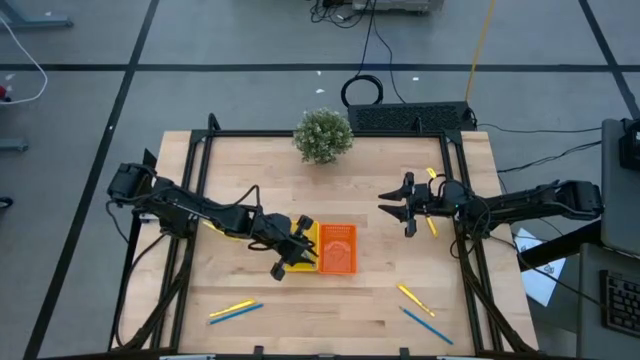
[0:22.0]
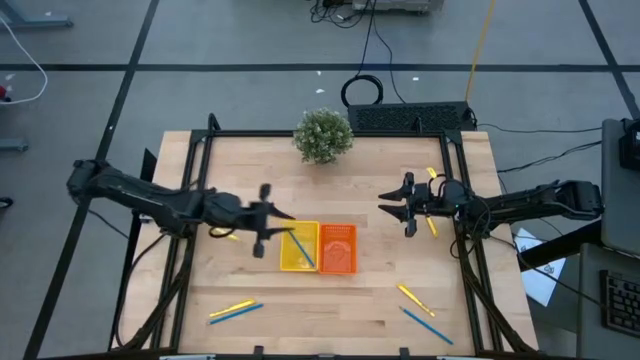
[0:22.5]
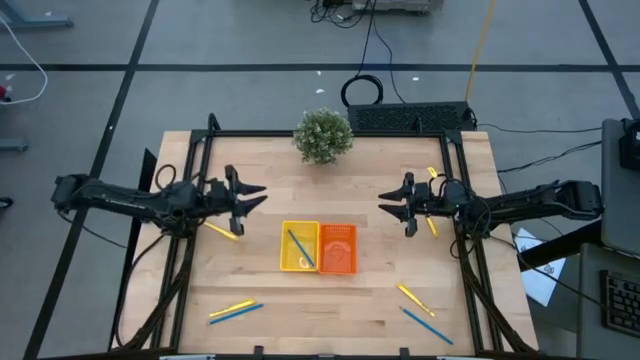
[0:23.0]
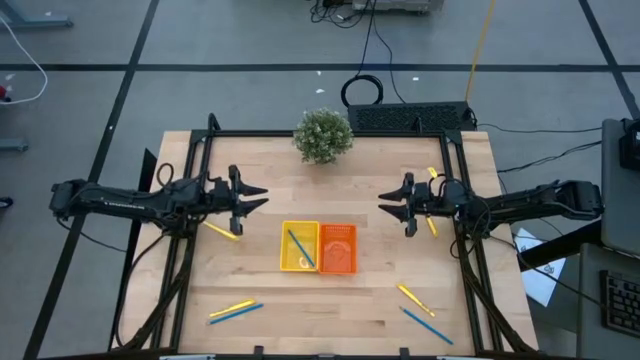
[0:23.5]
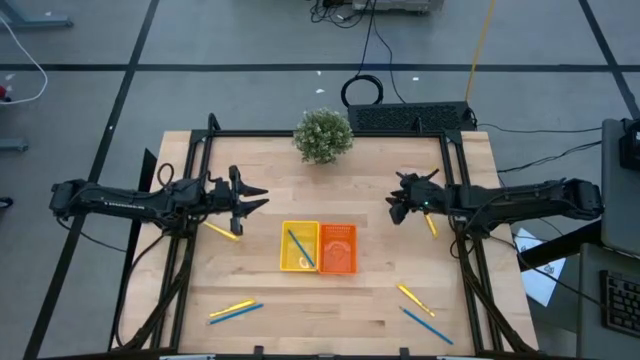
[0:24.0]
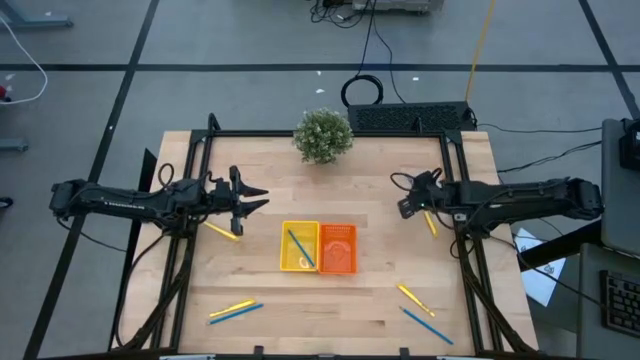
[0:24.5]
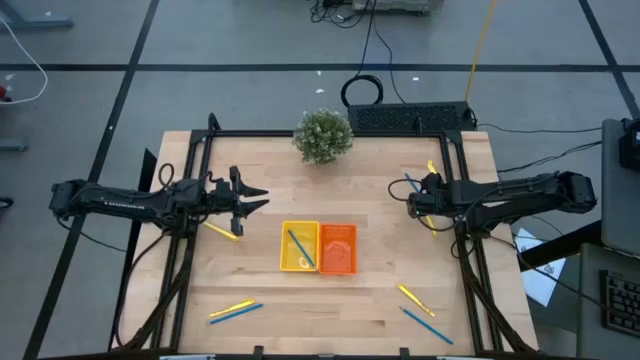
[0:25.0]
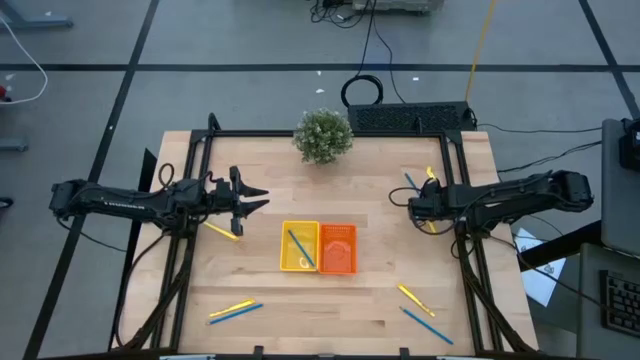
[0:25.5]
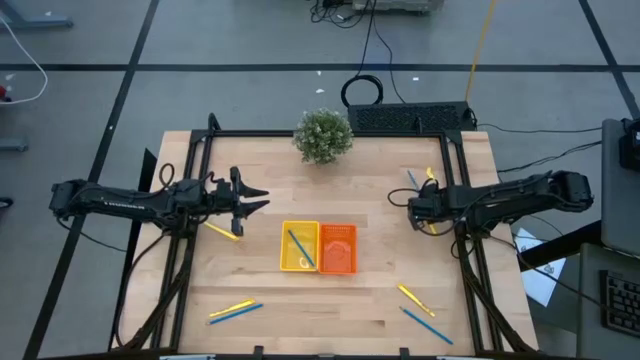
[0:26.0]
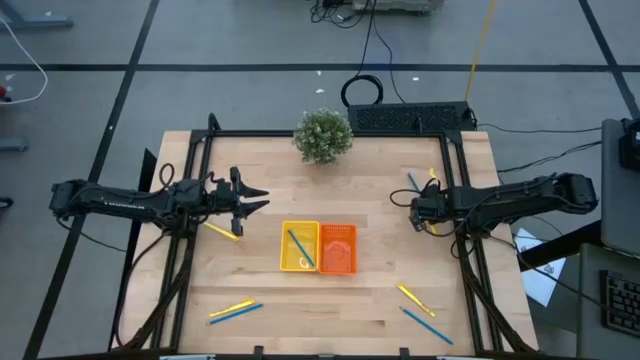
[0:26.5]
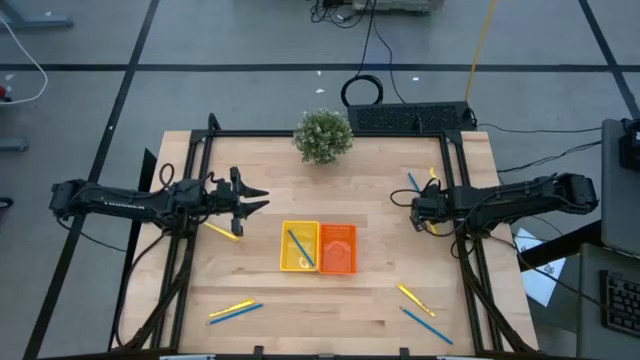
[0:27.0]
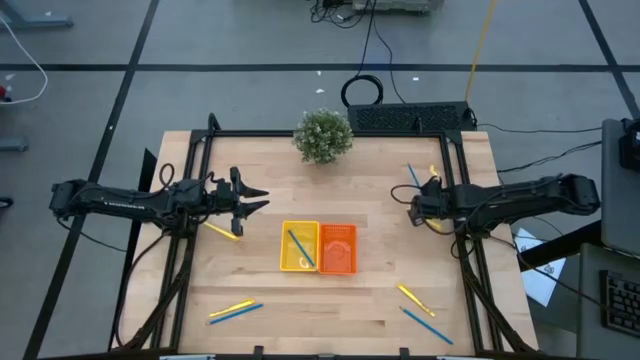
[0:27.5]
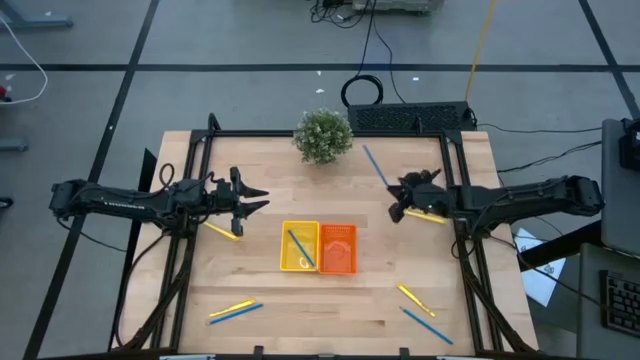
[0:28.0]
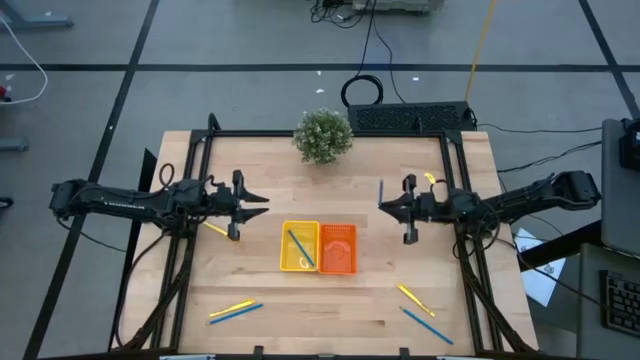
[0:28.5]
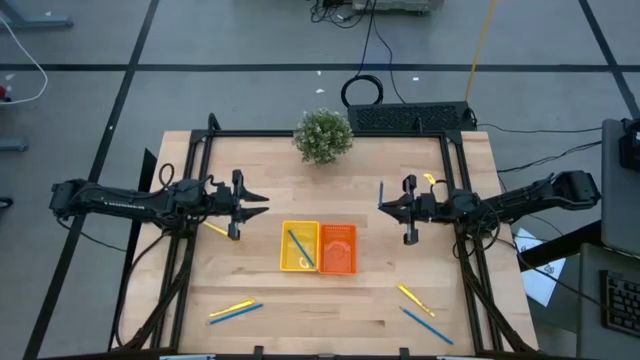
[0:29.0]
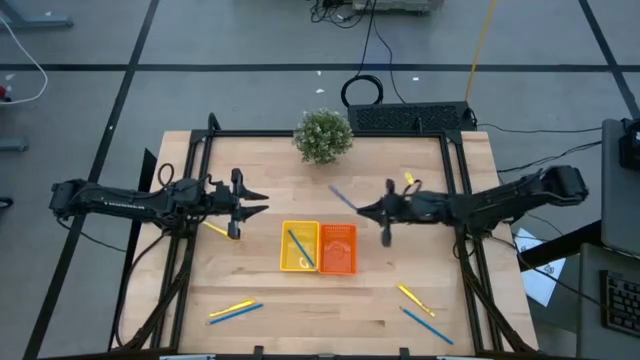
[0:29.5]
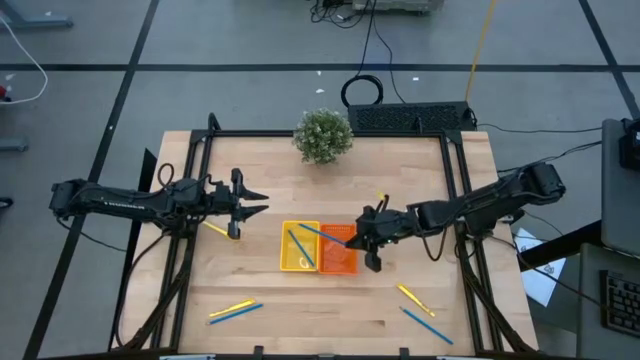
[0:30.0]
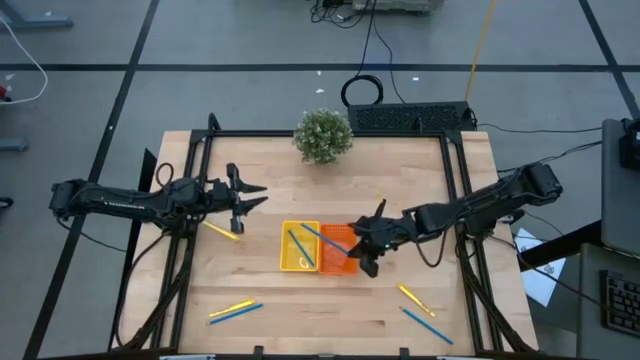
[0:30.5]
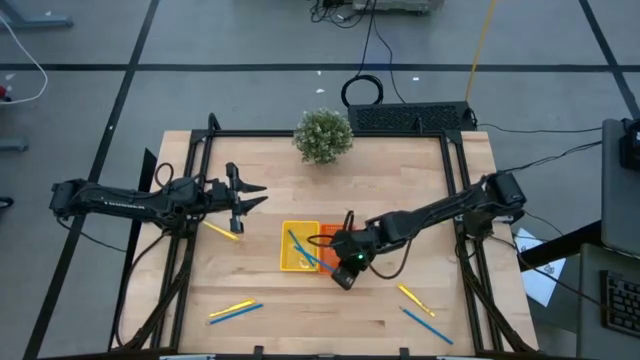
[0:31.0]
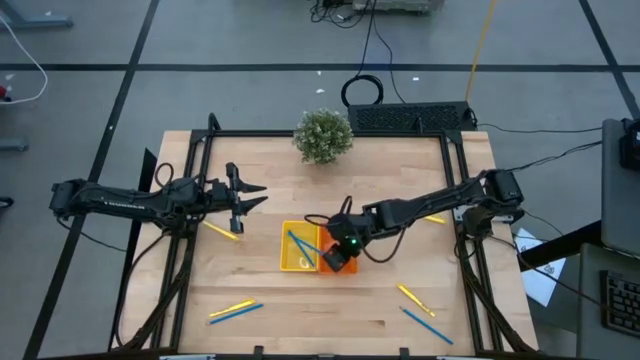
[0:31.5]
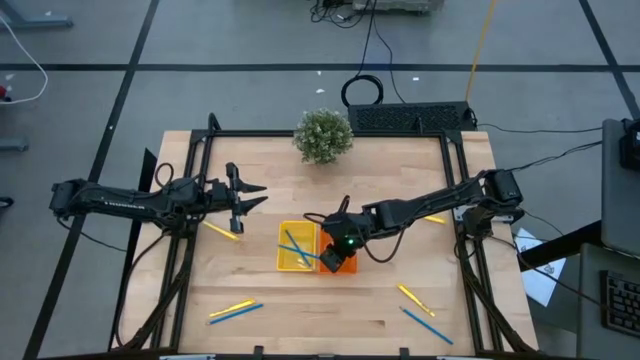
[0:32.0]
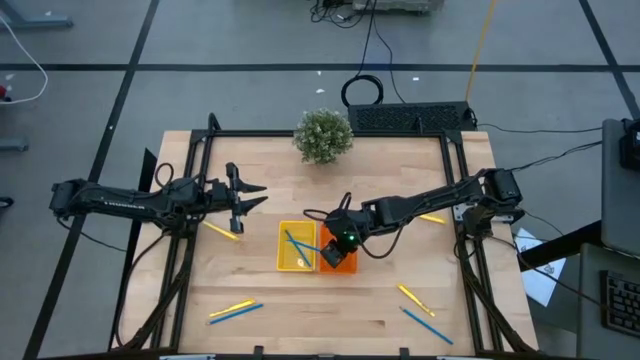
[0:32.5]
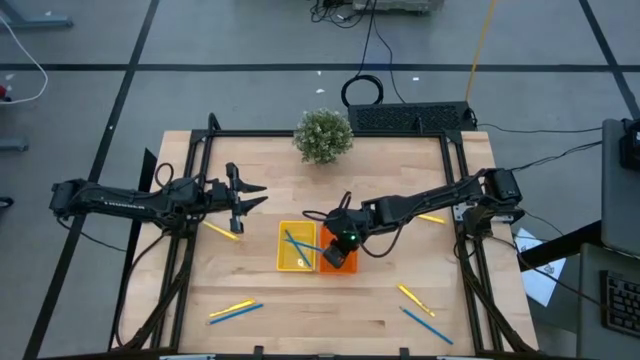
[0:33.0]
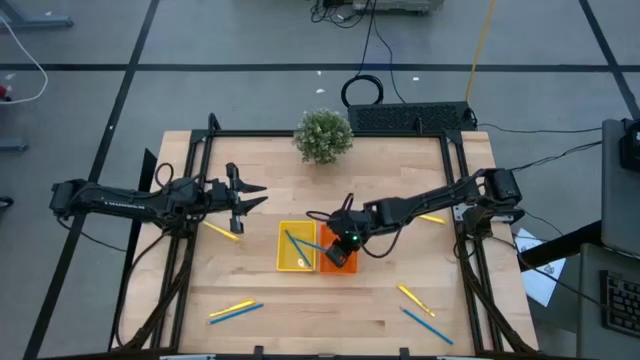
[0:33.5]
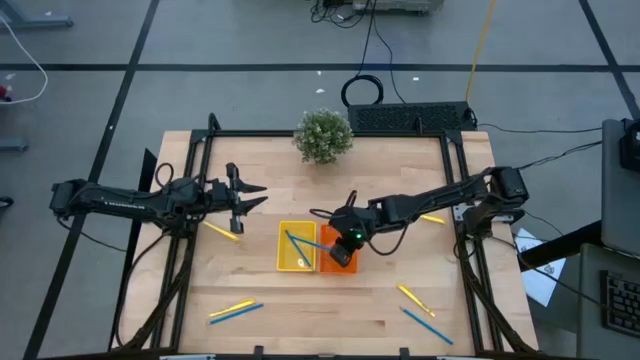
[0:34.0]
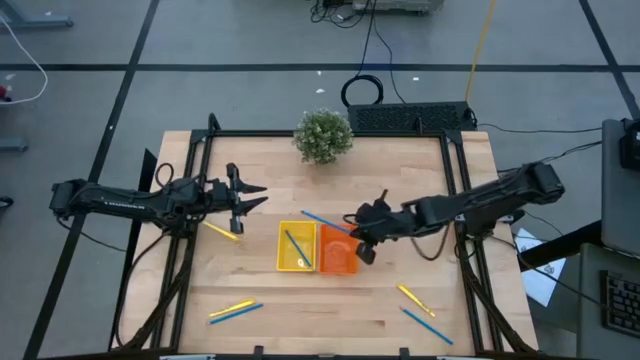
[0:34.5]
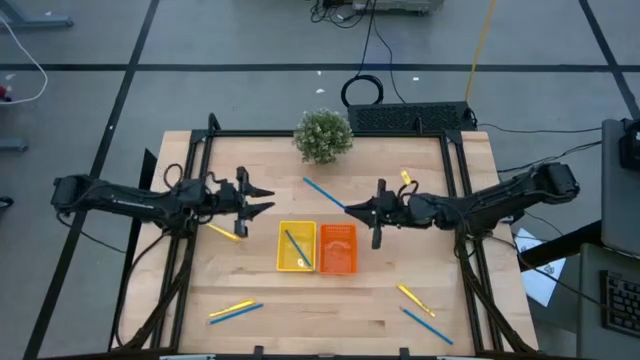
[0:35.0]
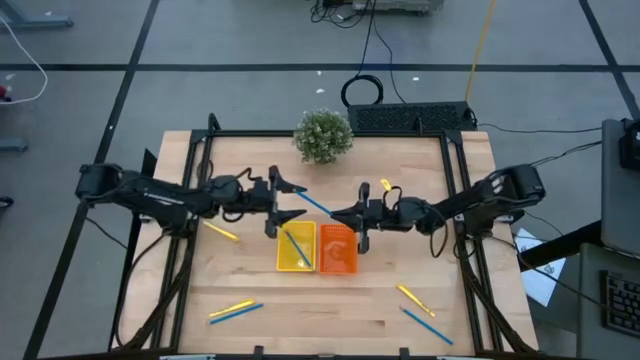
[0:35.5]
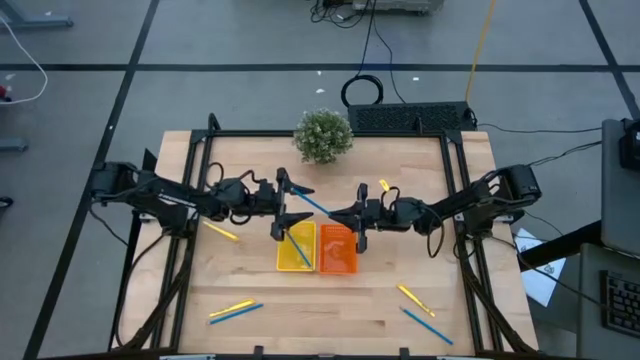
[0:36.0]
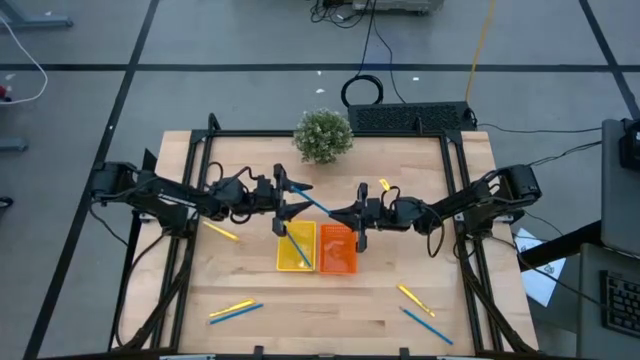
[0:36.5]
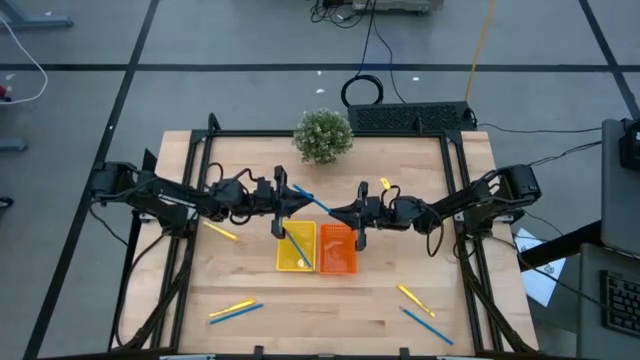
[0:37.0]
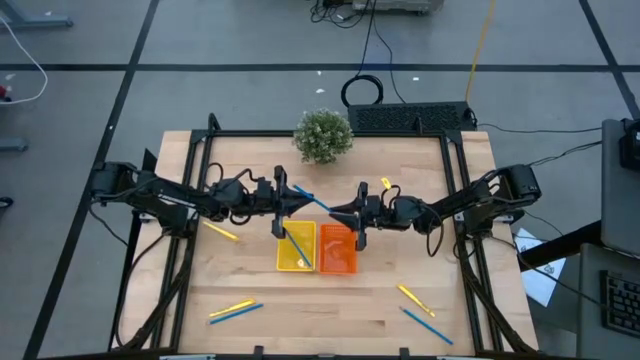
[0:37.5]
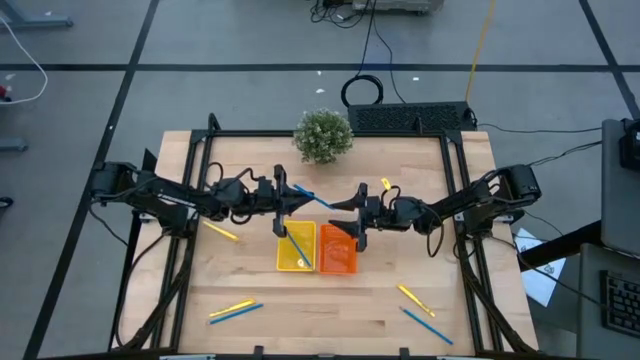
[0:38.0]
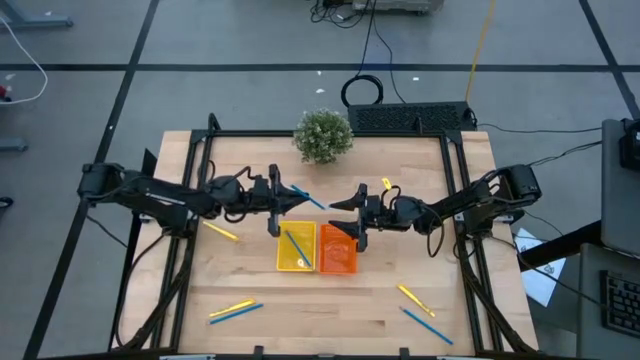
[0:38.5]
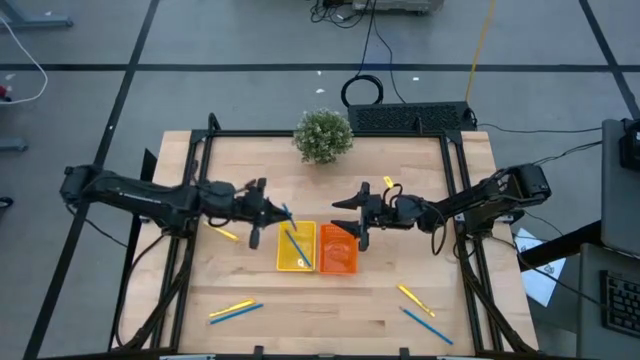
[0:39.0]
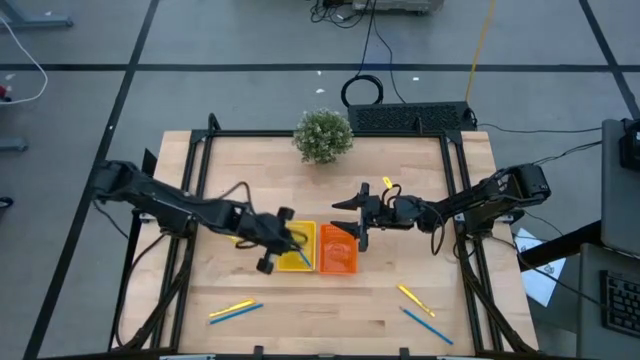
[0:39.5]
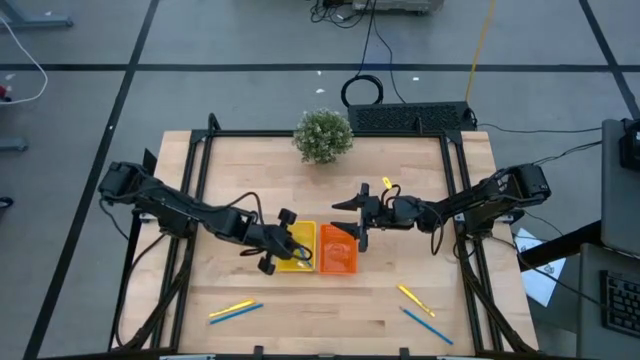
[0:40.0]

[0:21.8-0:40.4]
Task: Sort pens & pencils
Put the top blue pencil into the yellow bin
